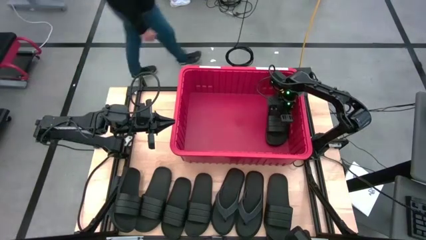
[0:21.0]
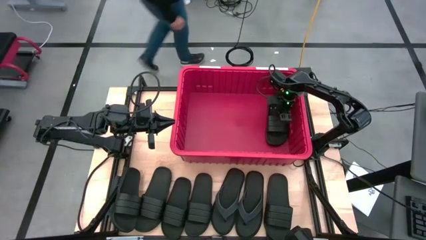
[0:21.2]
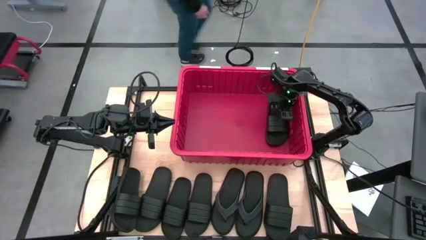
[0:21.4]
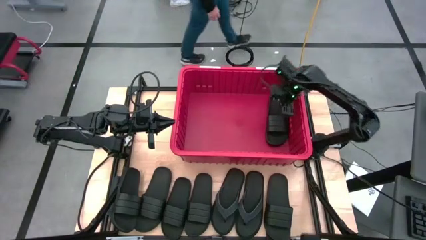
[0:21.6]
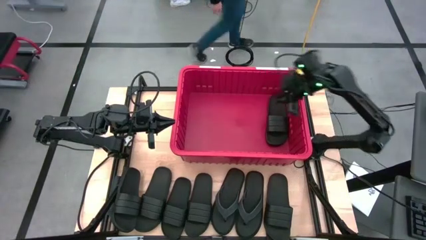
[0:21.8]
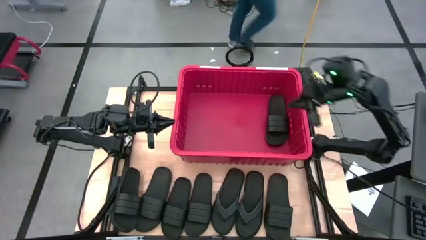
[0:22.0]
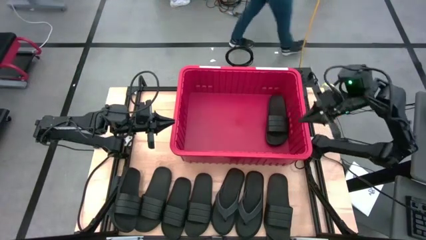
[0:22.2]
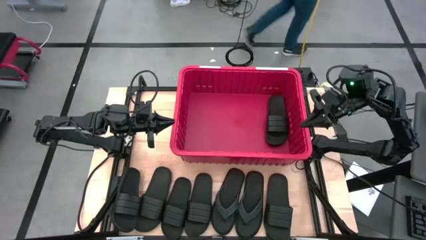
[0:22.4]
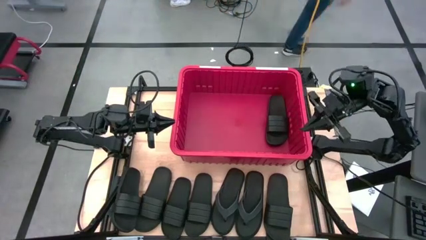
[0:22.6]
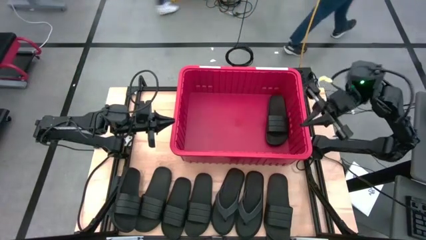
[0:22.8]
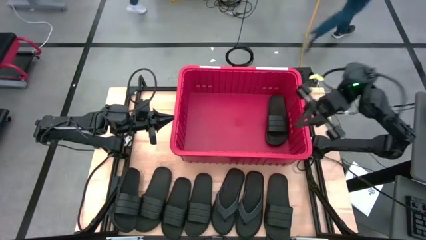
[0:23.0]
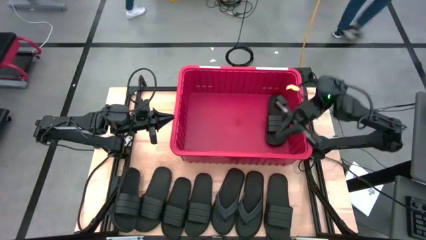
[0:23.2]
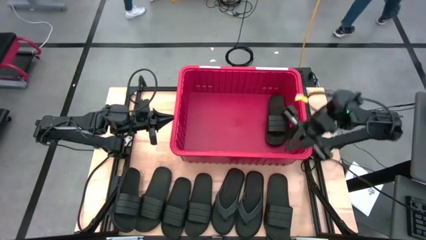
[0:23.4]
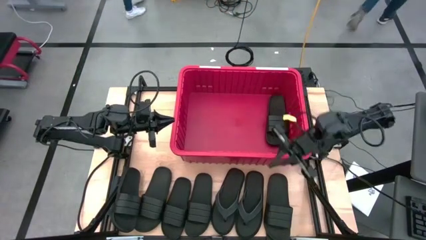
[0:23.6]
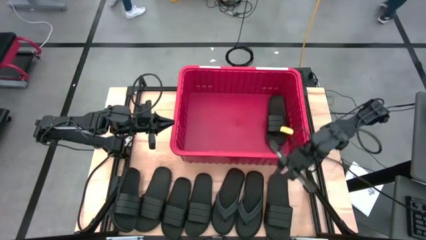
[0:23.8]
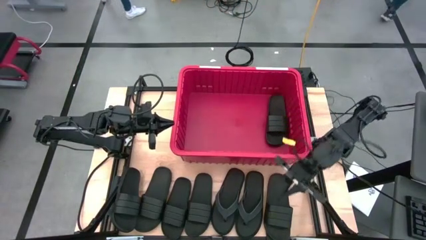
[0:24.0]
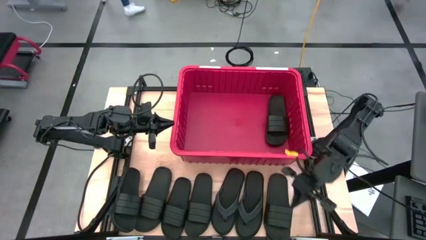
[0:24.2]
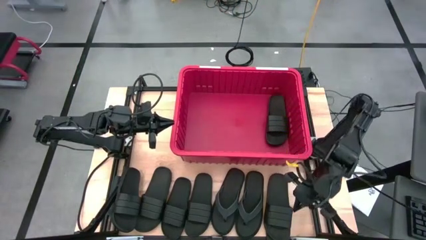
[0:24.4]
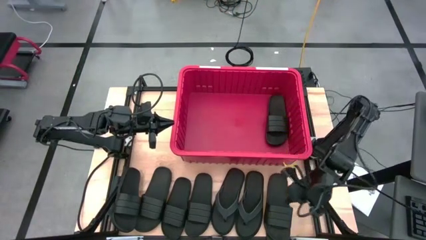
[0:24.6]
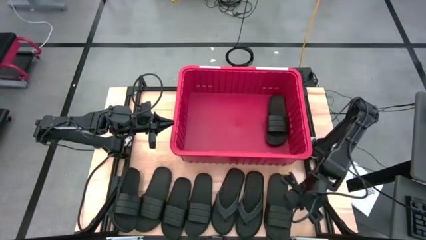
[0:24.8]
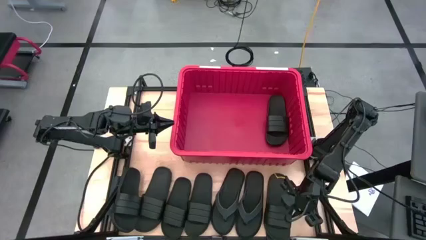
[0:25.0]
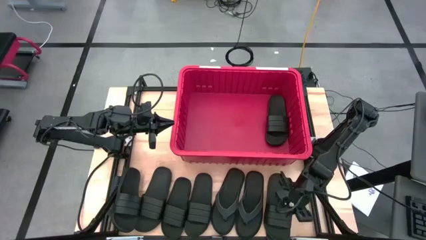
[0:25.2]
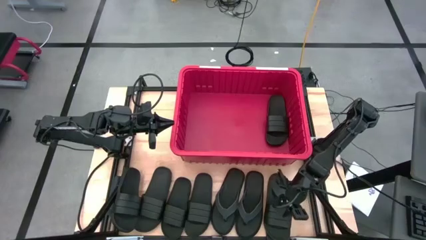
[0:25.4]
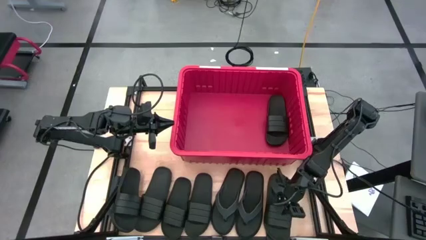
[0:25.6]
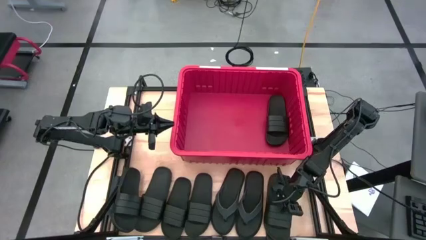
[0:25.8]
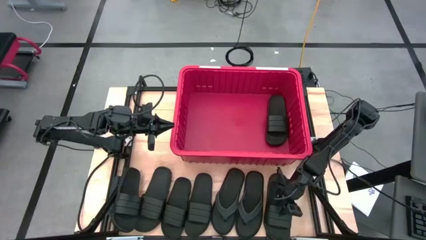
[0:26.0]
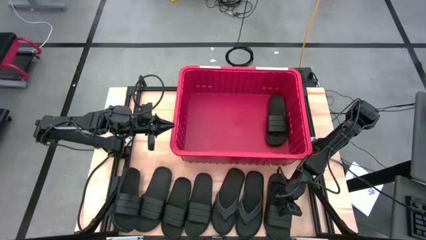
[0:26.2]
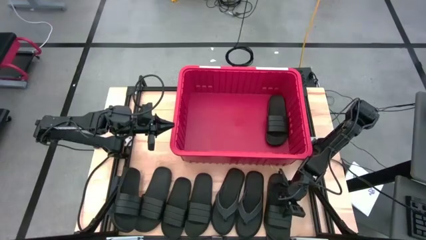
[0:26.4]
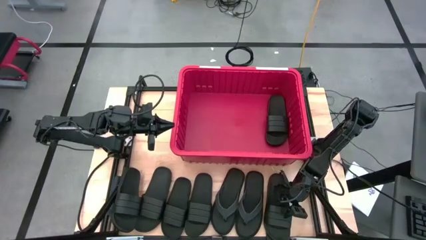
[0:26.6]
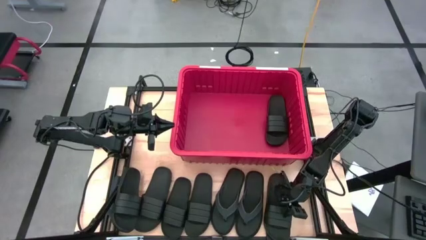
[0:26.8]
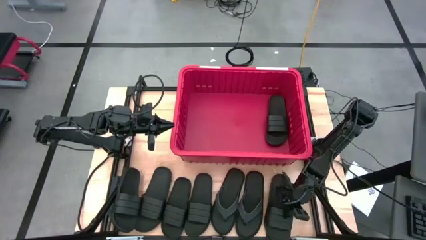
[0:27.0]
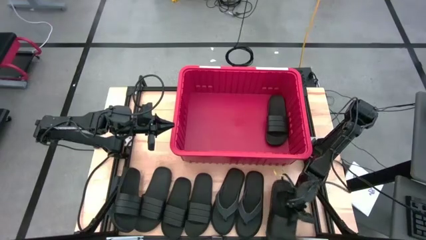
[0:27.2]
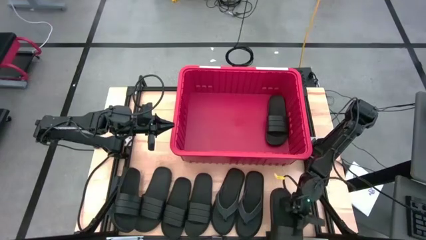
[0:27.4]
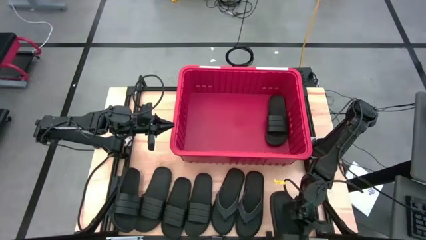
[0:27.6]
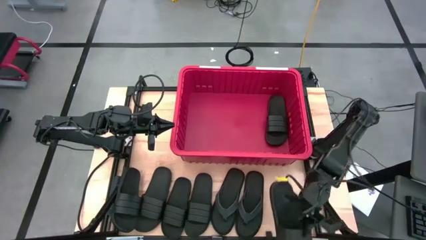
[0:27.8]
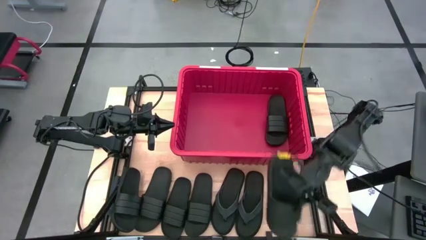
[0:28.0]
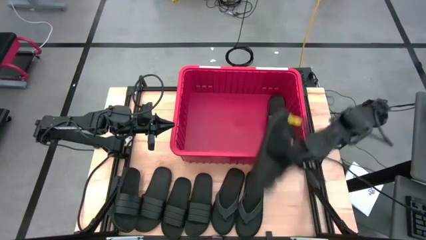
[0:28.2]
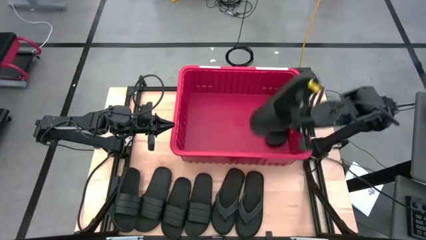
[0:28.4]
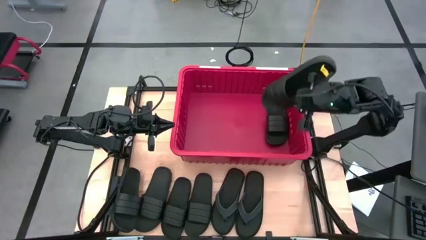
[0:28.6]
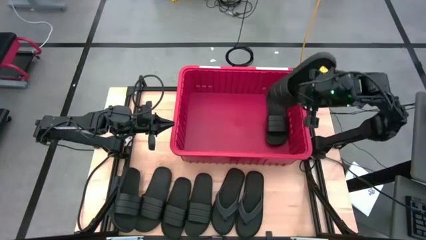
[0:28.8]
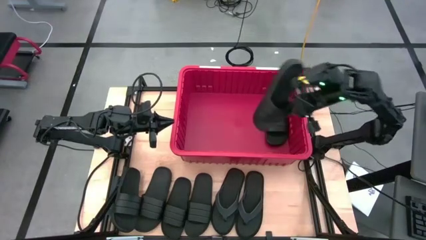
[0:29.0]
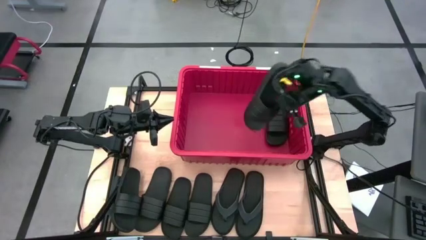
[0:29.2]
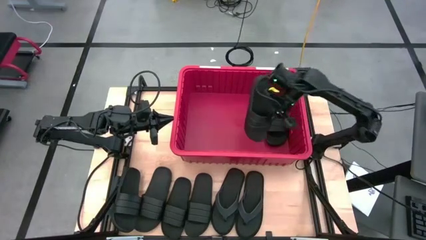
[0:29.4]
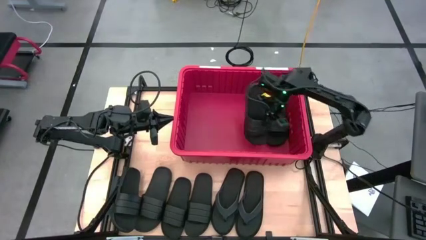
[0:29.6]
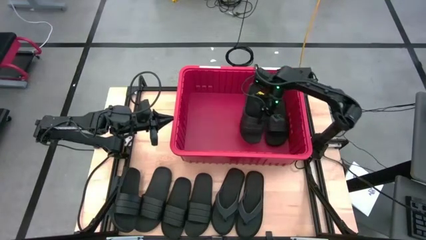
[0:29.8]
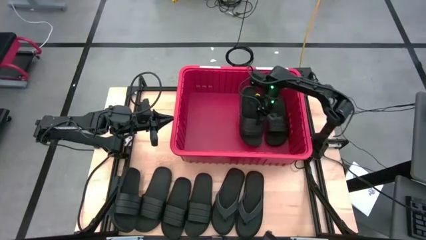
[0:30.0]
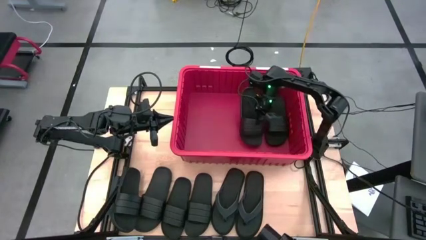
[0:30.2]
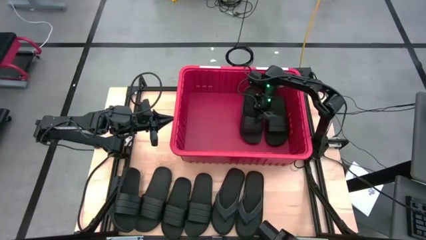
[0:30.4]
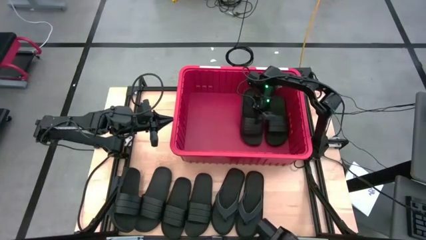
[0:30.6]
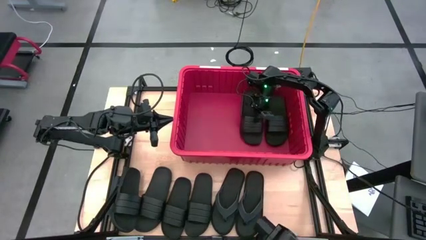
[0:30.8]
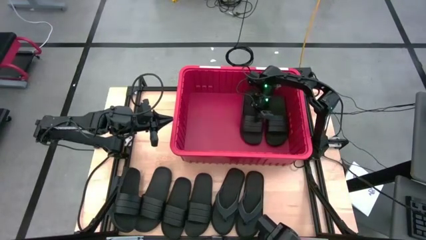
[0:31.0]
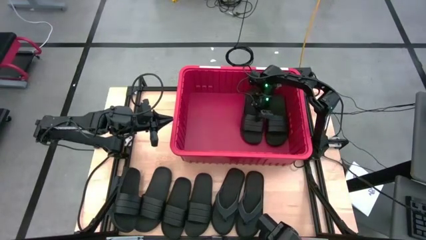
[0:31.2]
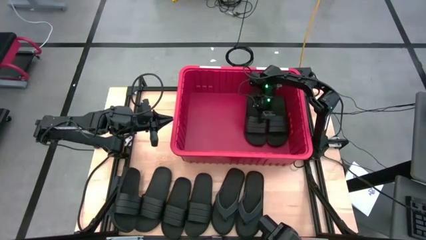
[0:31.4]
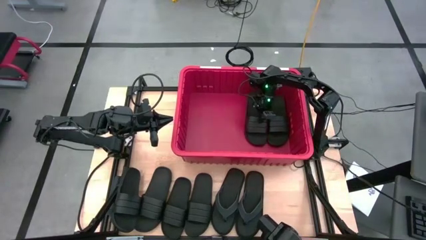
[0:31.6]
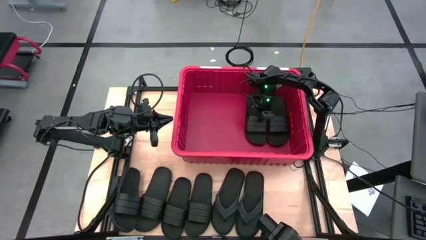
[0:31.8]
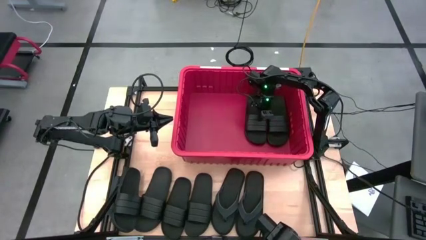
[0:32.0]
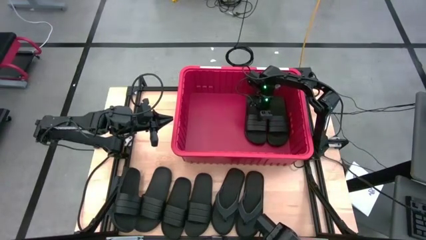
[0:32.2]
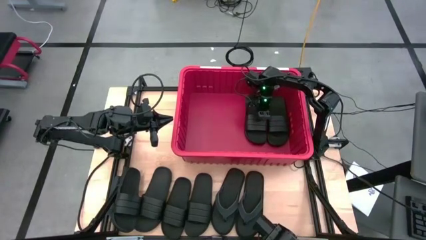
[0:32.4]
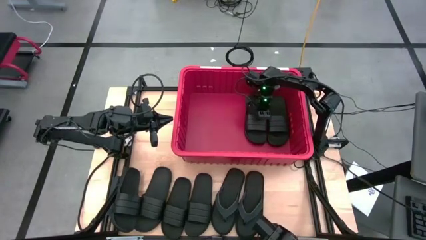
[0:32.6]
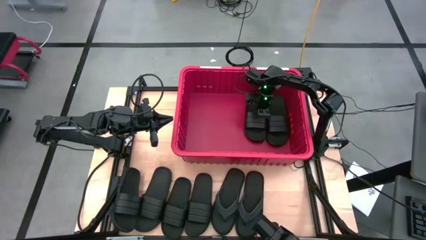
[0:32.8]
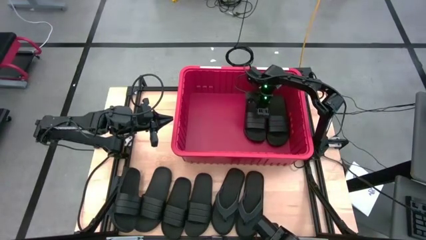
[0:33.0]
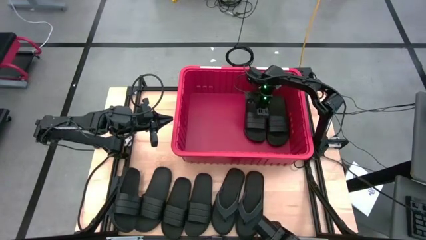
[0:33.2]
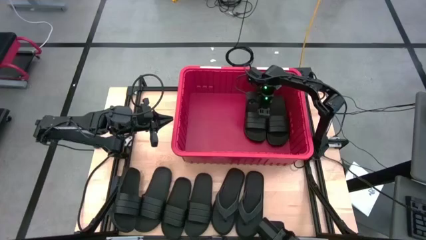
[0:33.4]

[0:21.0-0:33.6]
Task: Pick and place slides into bin
Put the black slide into the red container
